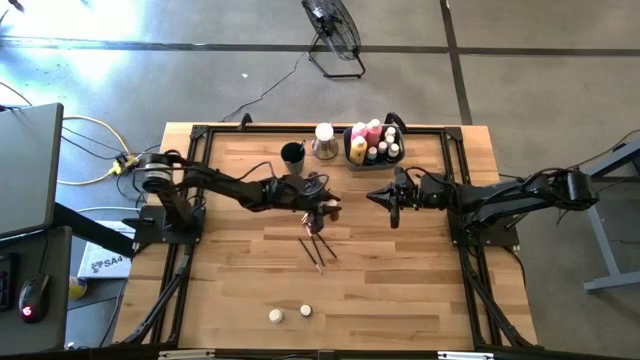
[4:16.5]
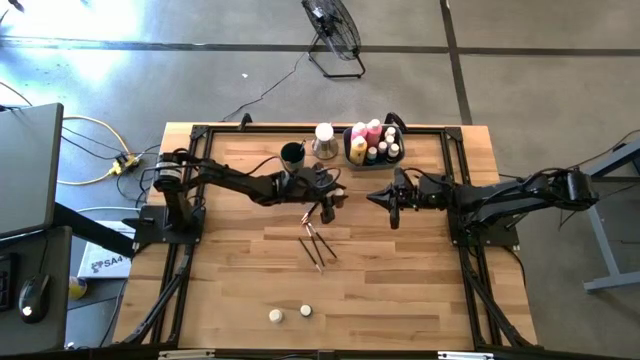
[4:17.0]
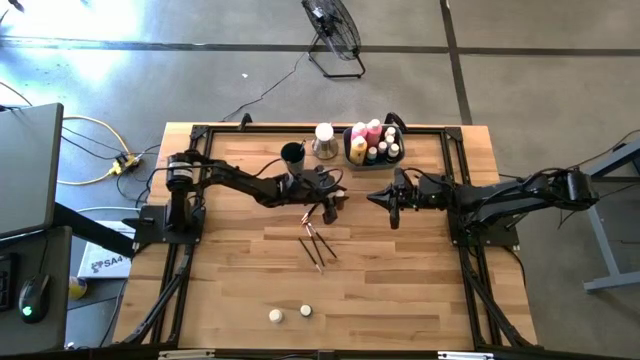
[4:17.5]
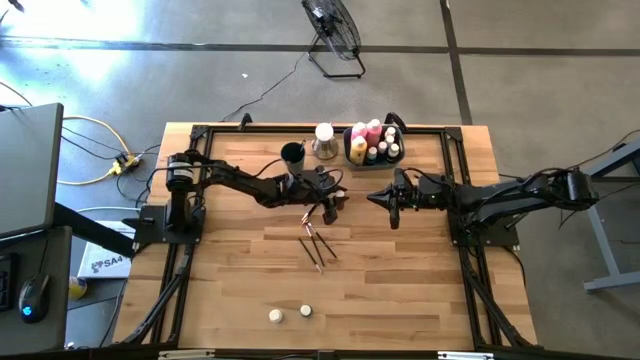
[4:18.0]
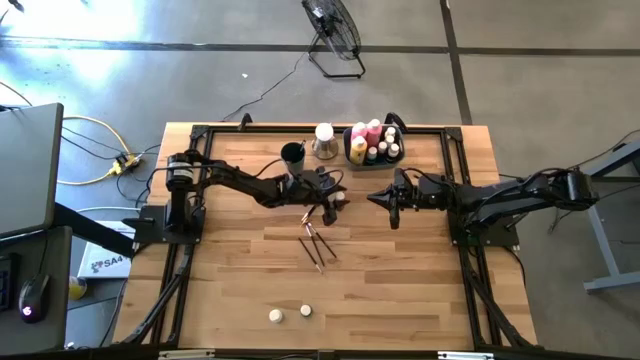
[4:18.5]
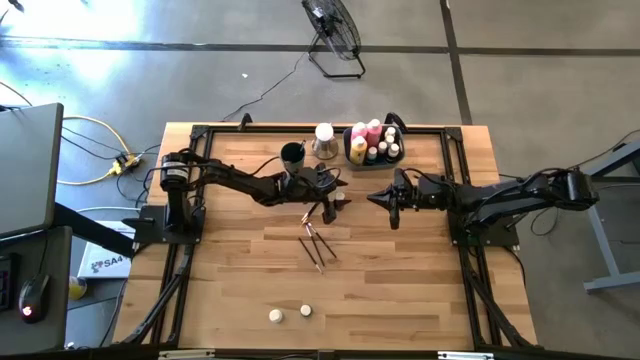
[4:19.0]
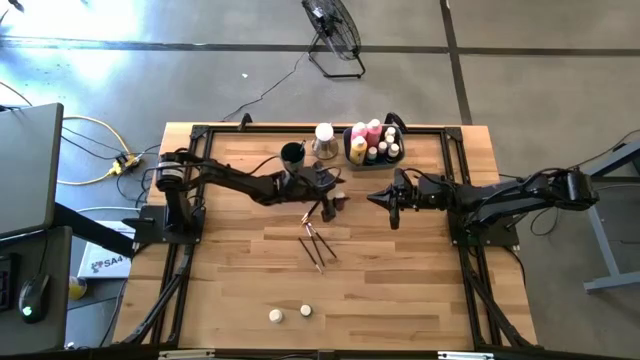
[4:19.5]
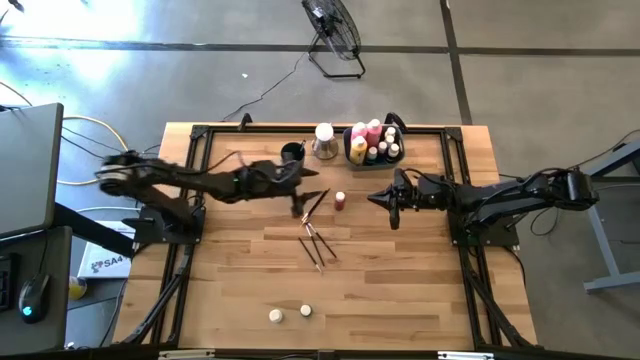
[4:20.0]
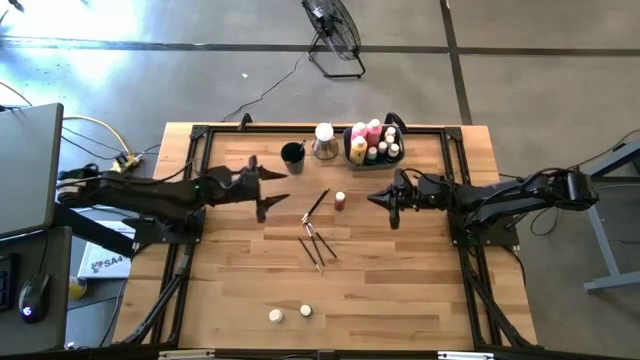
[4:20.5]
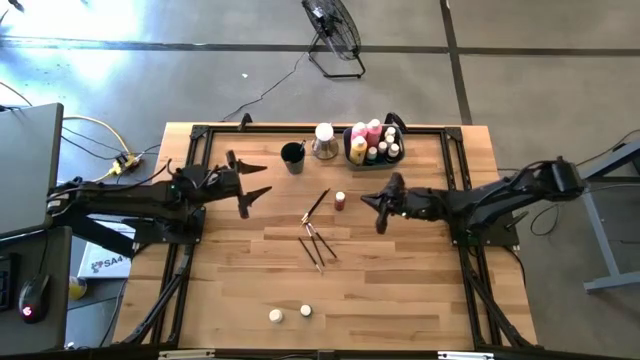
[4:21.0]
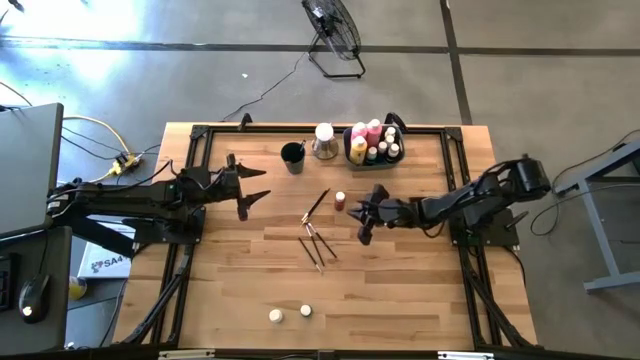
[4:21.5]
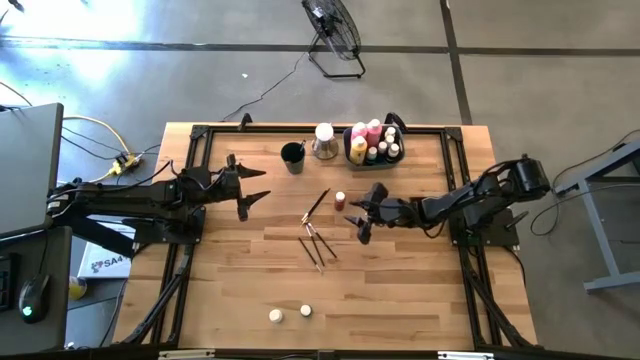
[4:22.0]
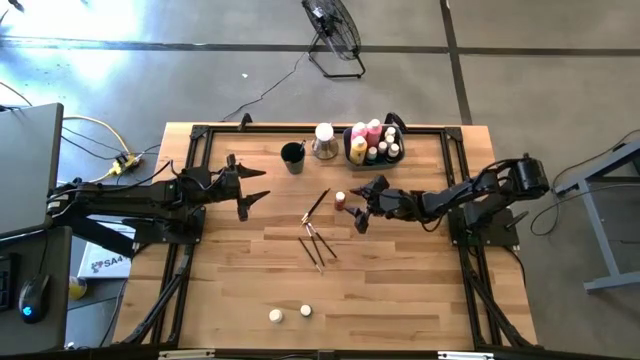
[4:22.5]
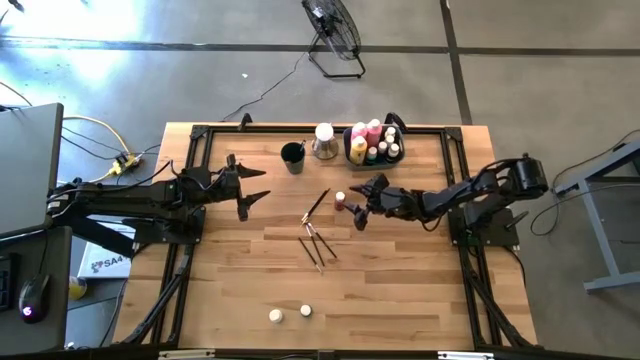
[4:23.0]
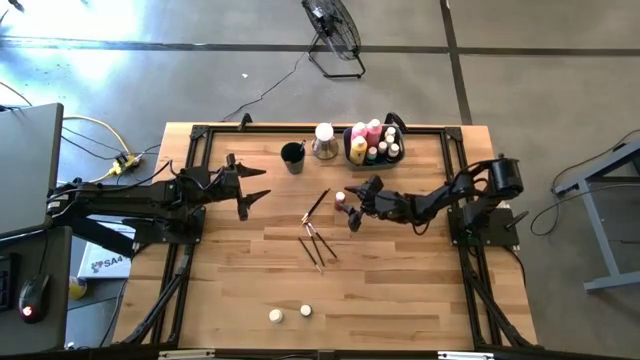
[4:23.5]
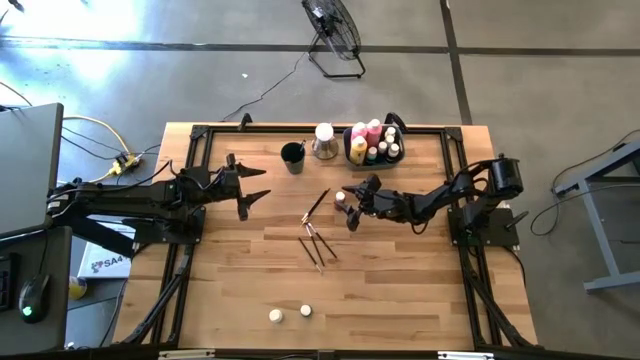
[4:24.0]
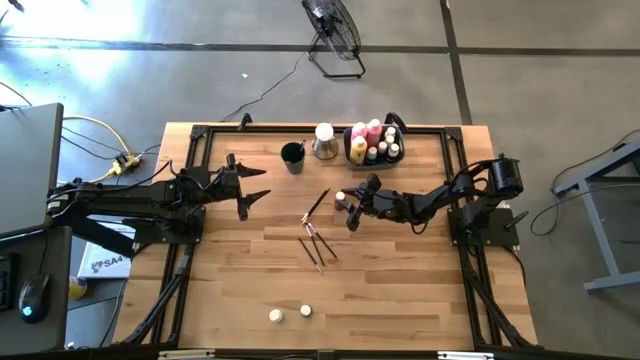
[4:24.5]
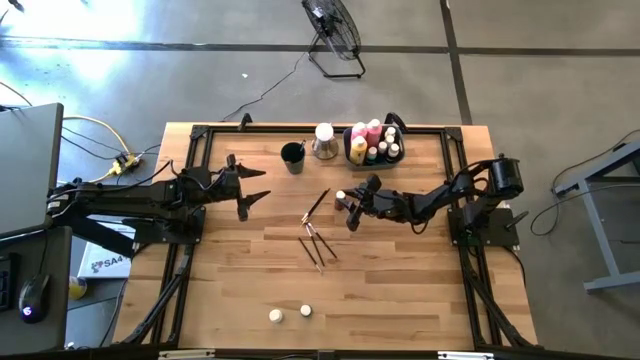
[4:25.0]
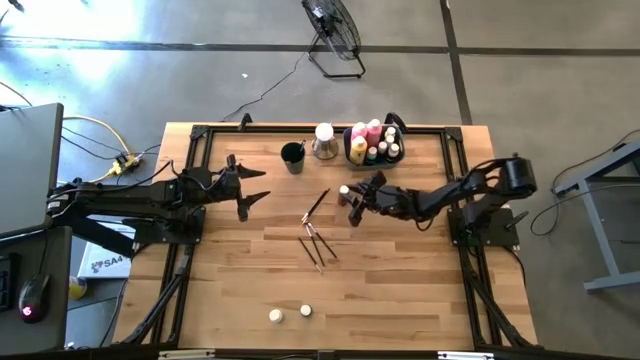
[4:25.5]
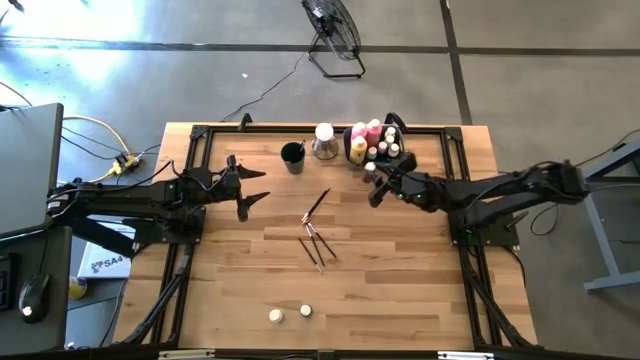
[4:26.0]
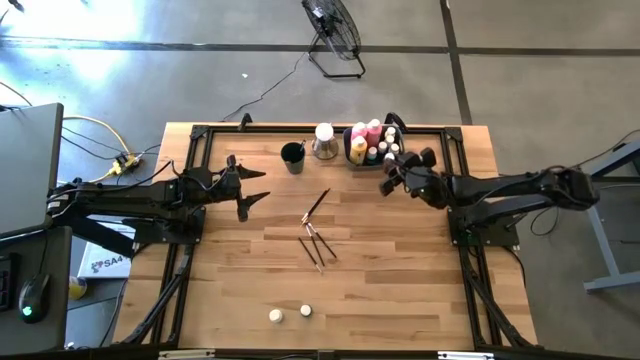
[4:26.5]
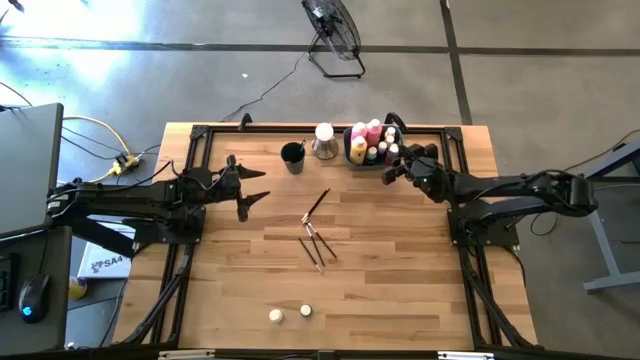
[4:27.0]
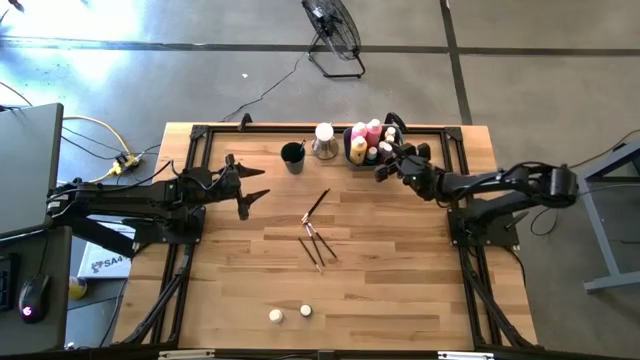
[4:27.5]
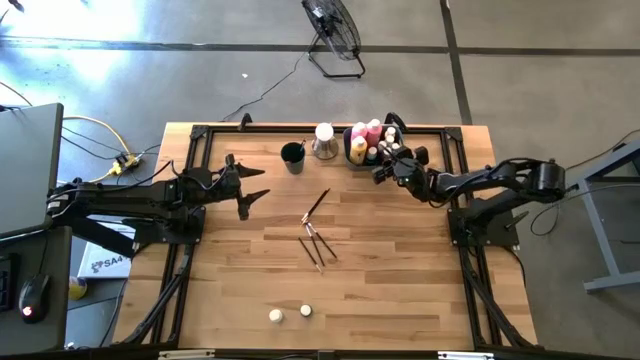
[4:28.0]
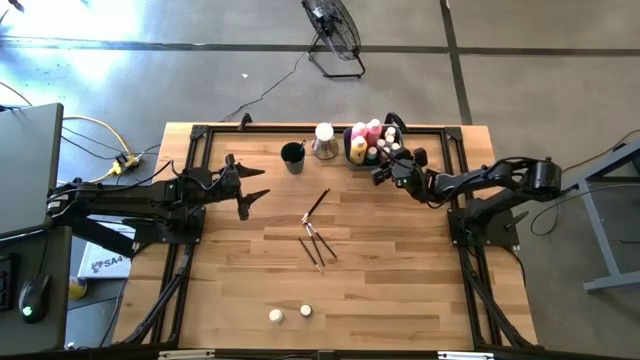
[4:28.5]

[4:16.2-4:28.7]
Task: Pick & Place Paint Supplies
Put the small red paint bottle into the blue bin

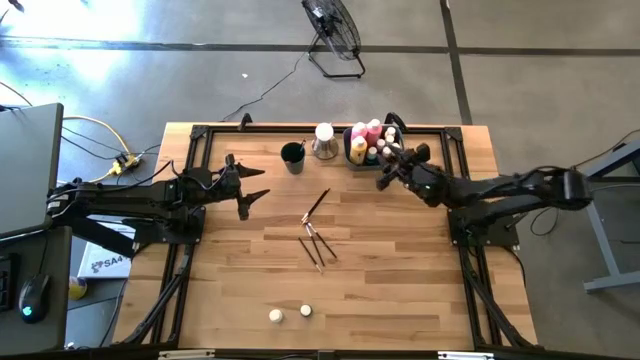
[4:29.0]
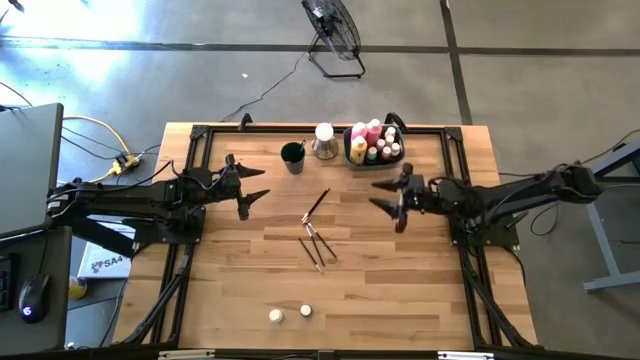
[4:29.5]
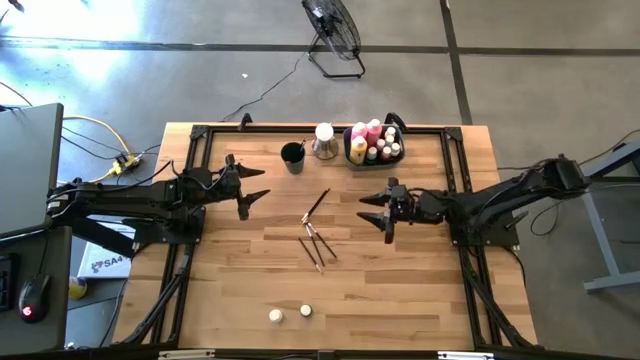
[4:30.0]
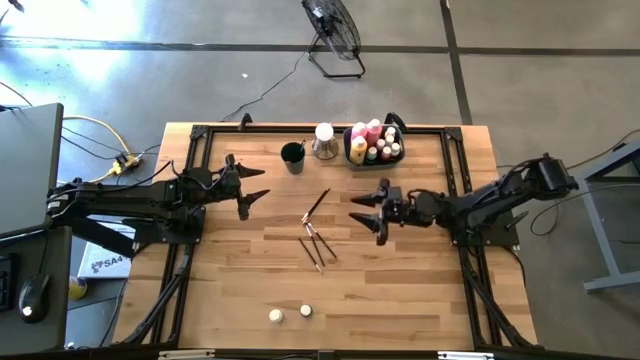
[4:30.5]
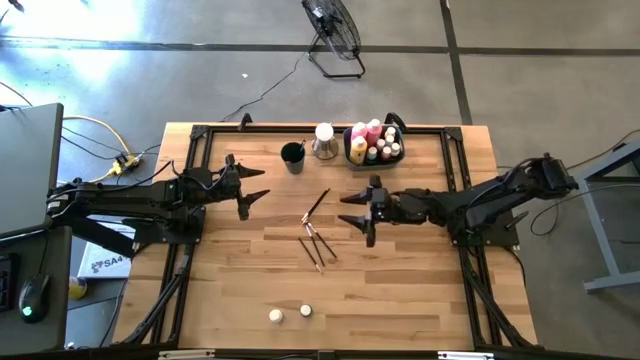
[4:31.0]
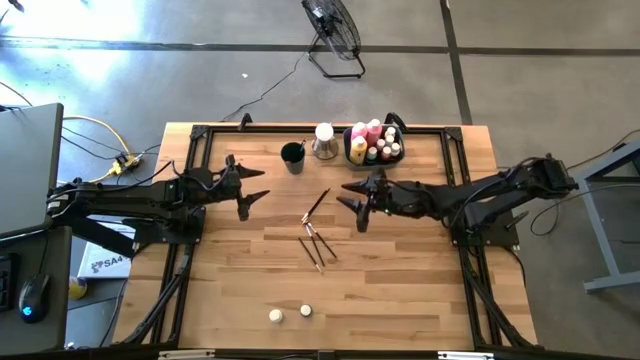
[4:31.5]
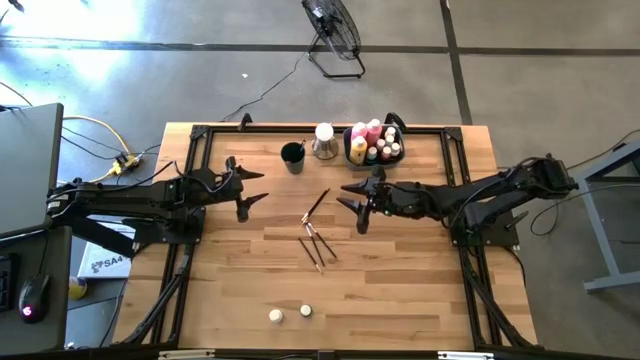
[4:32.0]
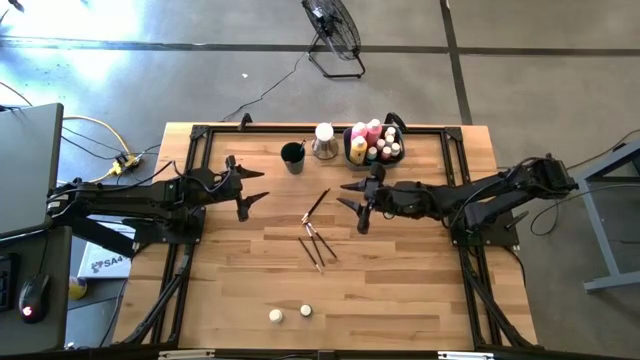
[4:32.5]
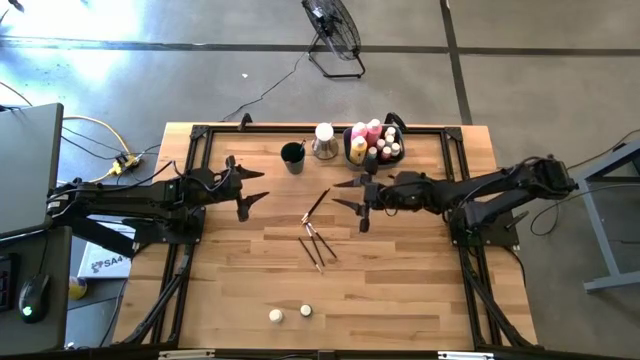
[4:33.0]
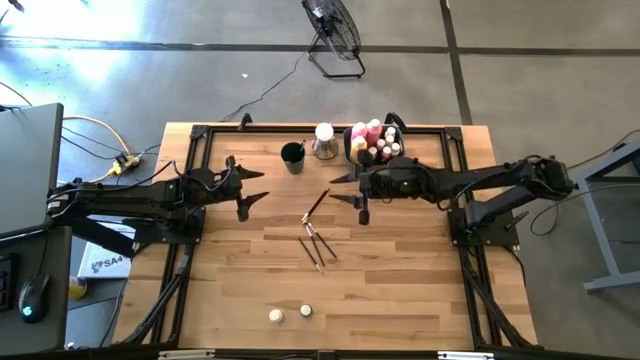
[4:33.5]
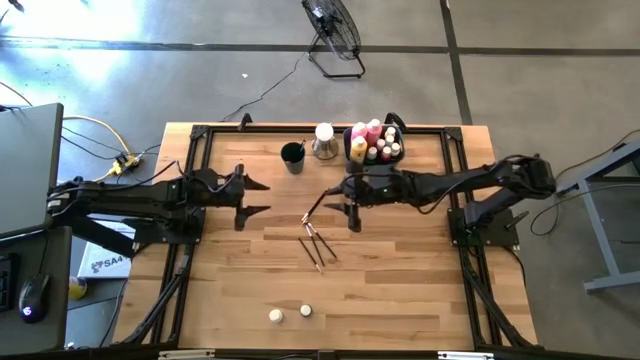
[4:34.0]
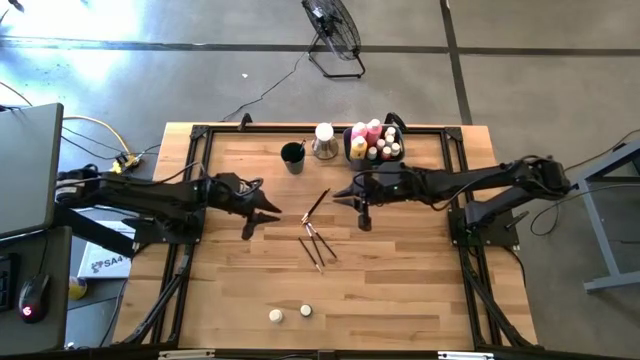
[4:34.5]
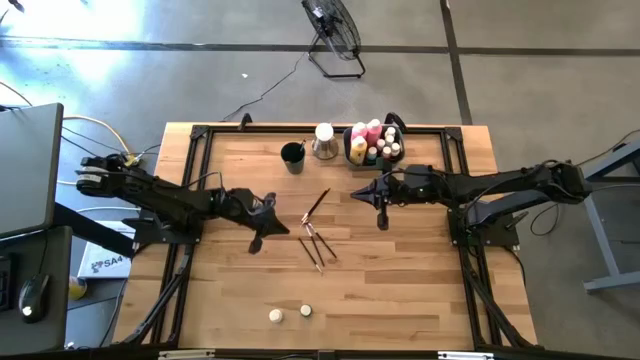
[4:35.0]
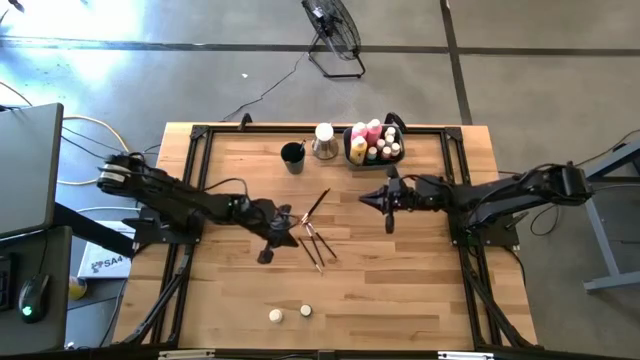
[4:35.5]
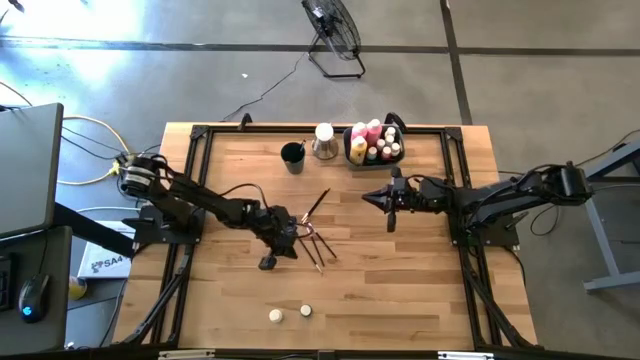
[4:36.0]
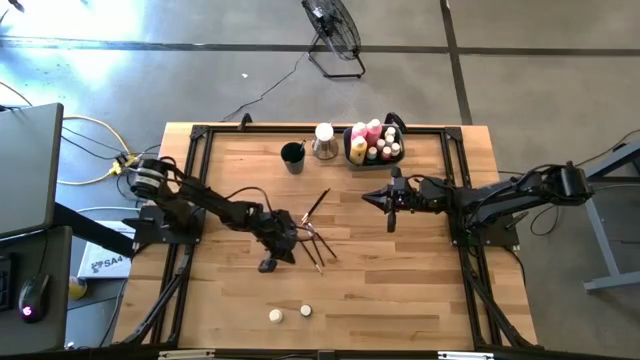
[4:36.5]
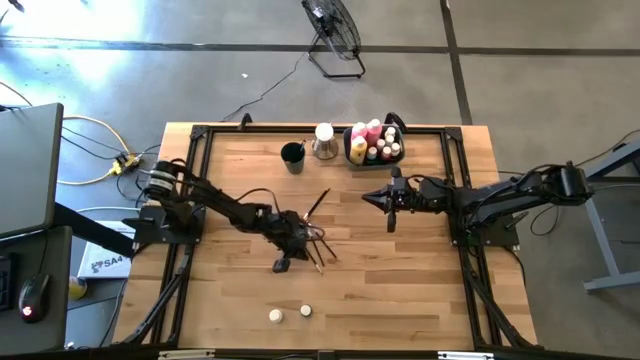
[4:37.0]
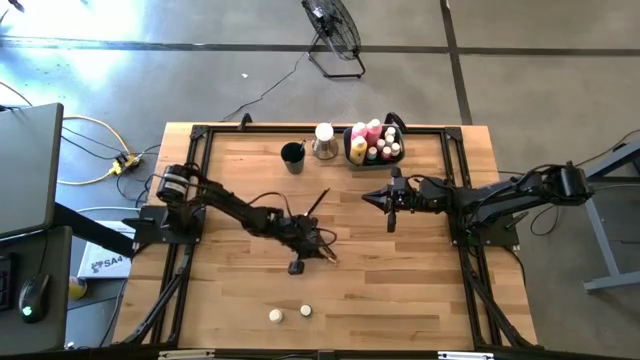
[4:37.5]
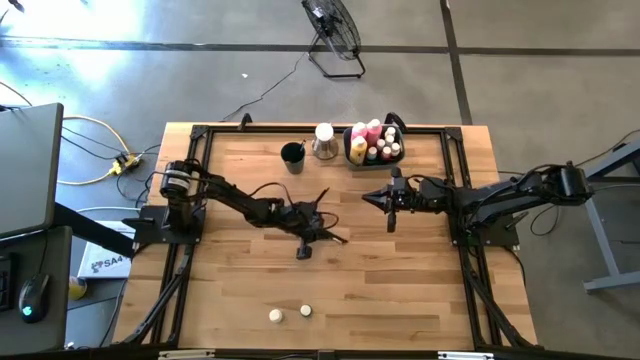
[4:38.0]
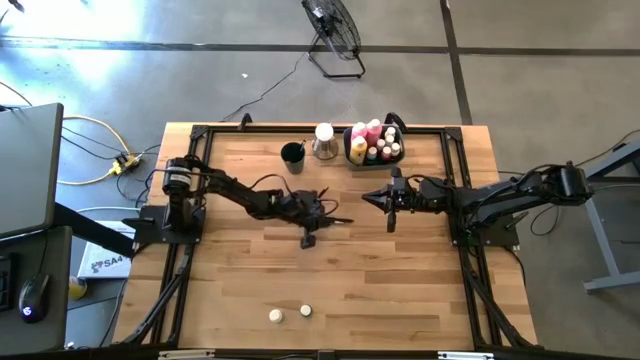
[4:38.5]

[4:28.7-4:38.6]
Adjust the paintbrushes
